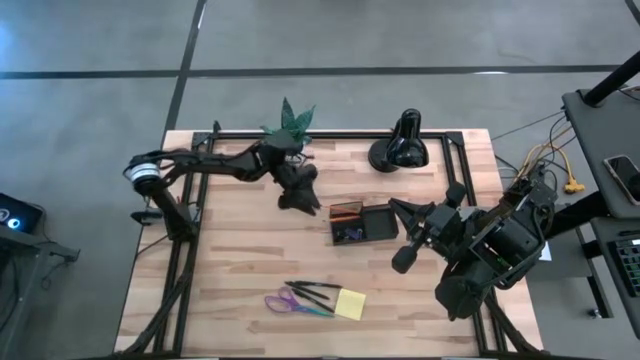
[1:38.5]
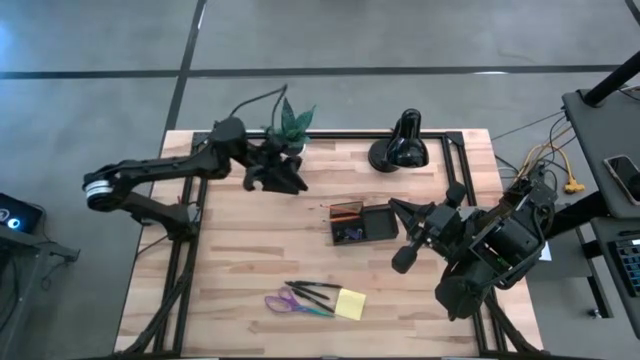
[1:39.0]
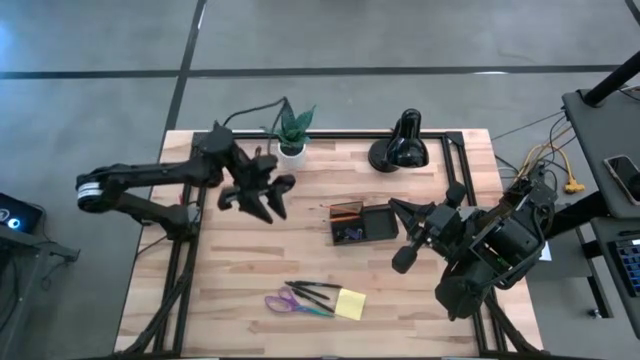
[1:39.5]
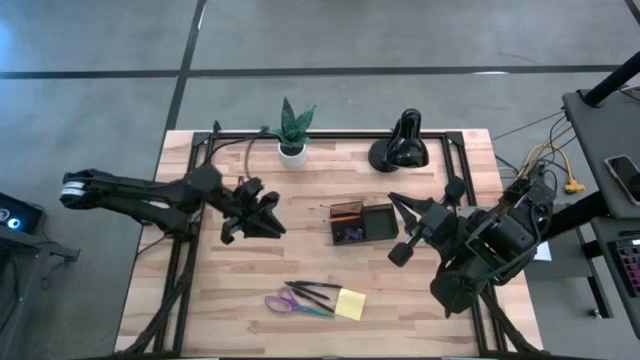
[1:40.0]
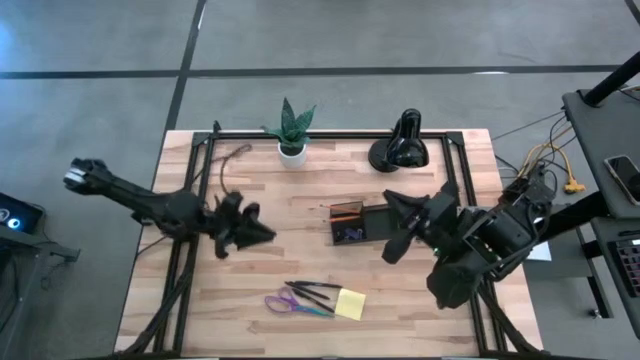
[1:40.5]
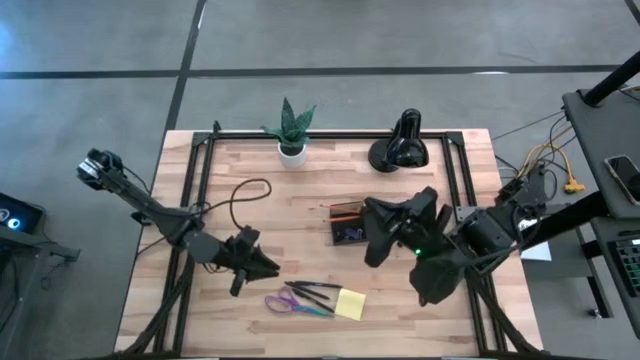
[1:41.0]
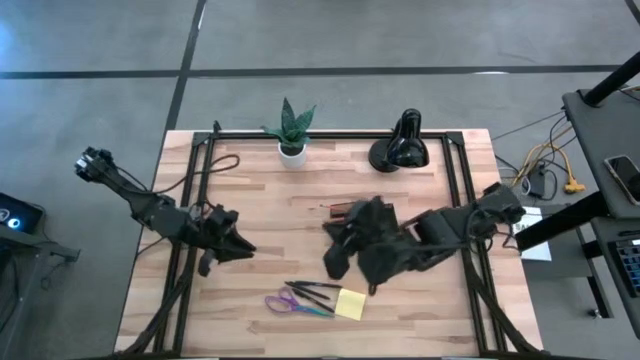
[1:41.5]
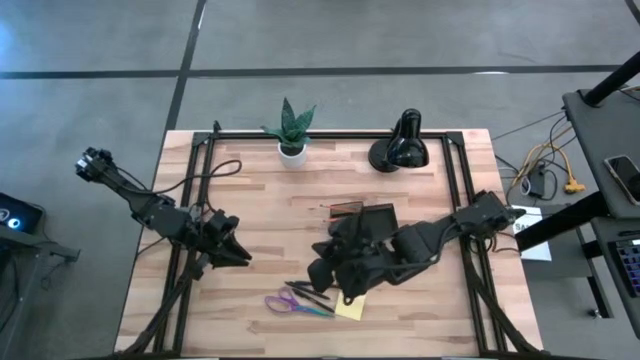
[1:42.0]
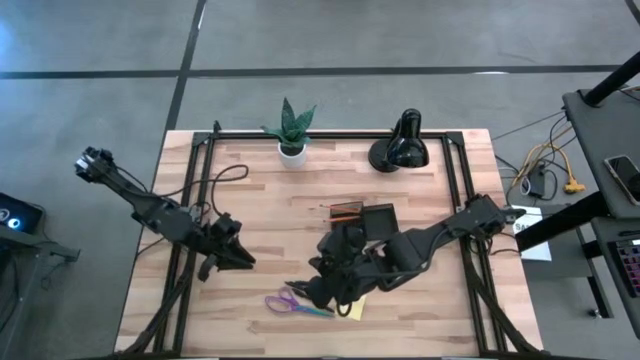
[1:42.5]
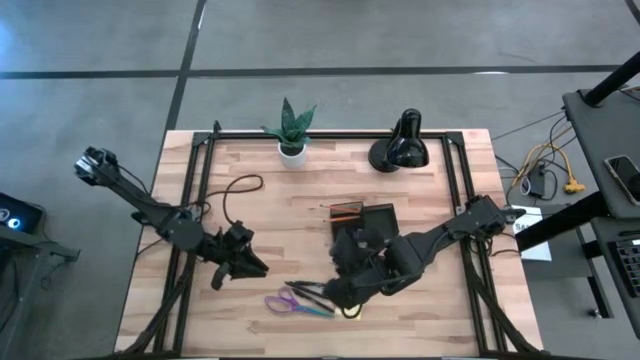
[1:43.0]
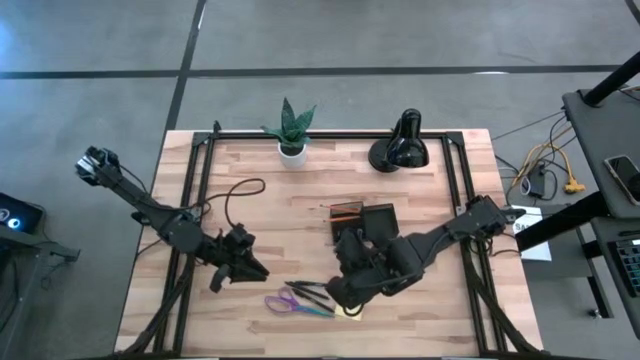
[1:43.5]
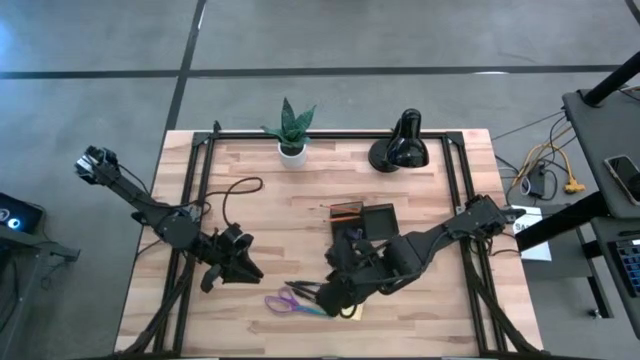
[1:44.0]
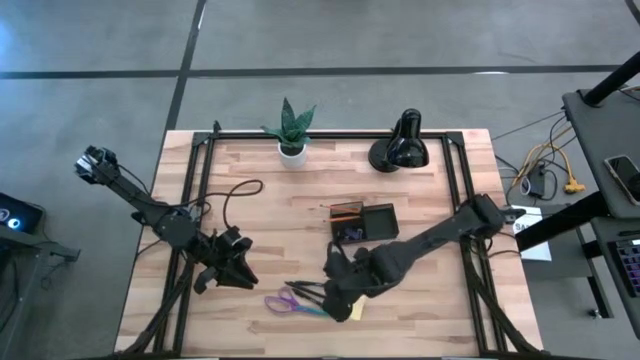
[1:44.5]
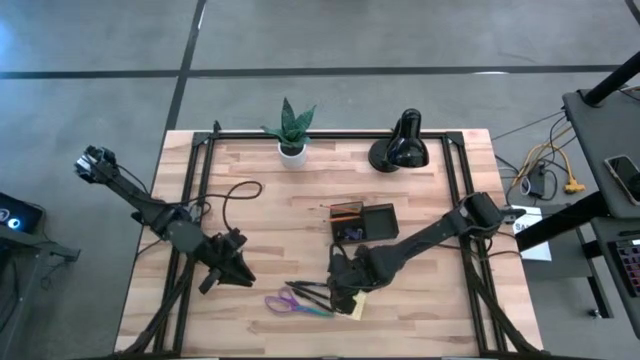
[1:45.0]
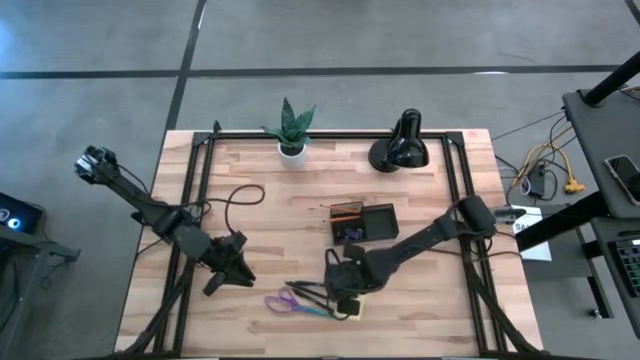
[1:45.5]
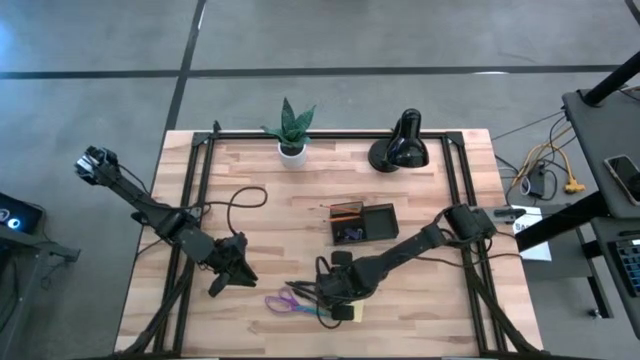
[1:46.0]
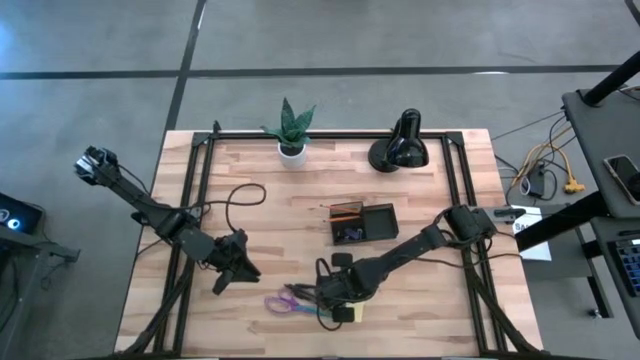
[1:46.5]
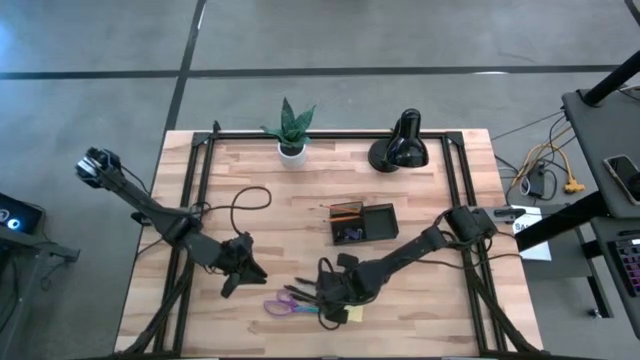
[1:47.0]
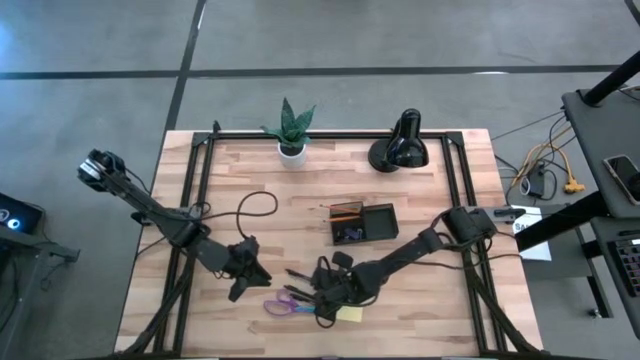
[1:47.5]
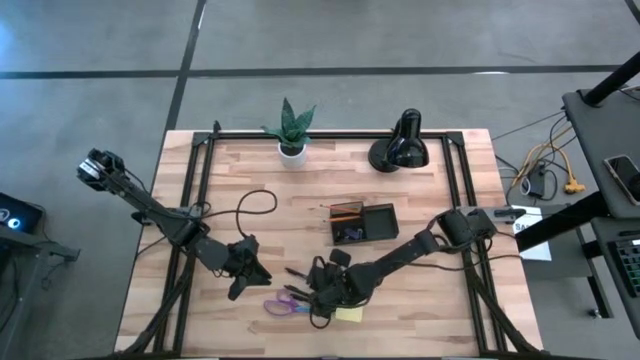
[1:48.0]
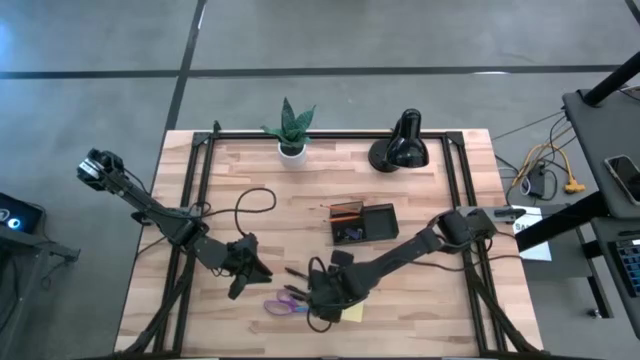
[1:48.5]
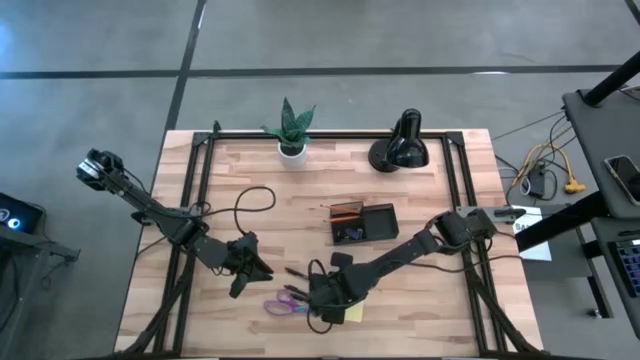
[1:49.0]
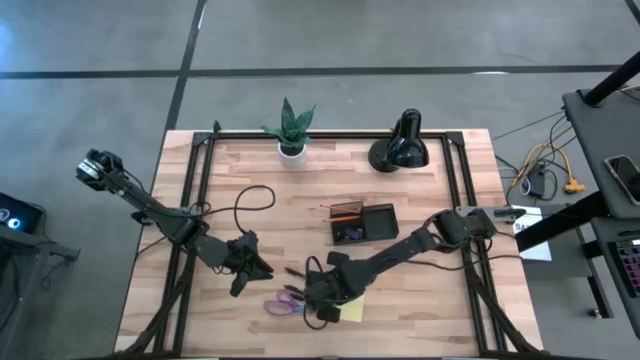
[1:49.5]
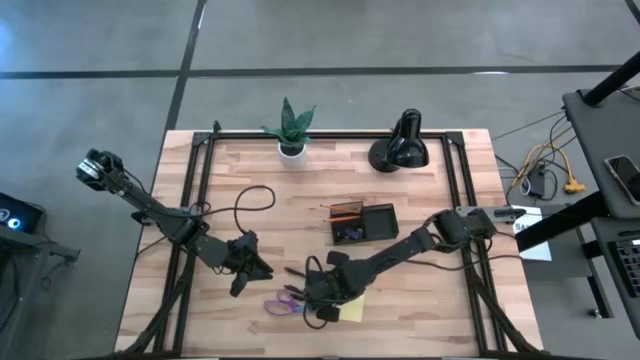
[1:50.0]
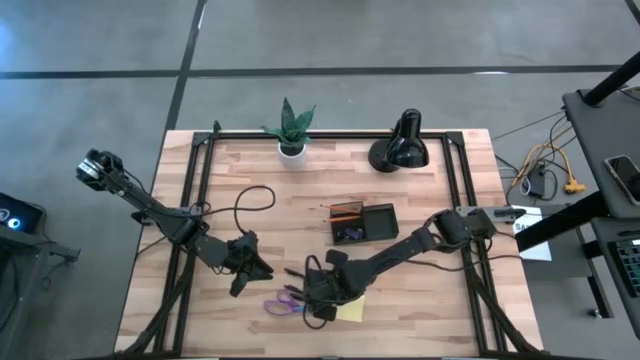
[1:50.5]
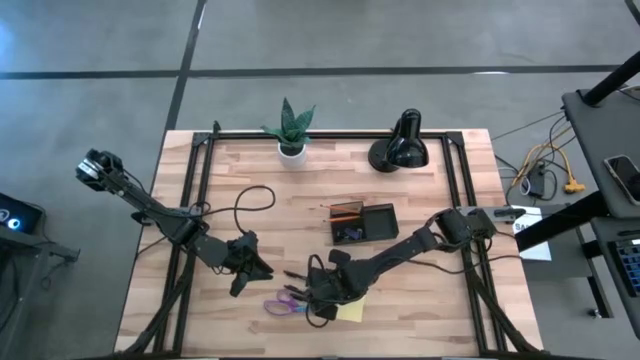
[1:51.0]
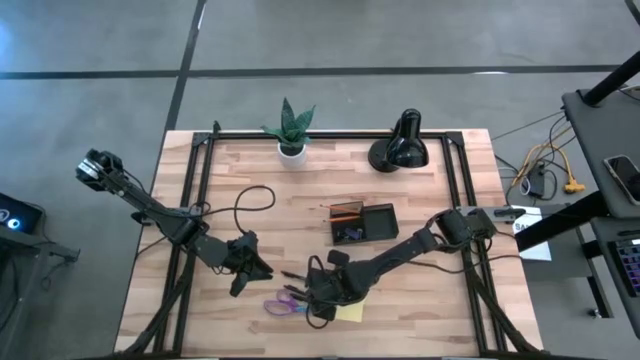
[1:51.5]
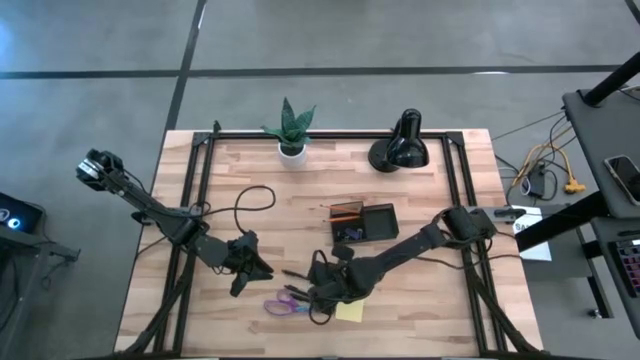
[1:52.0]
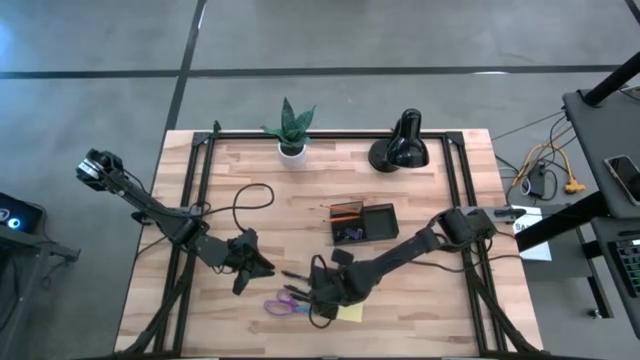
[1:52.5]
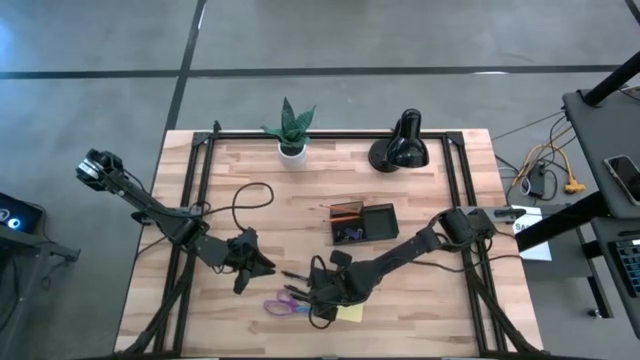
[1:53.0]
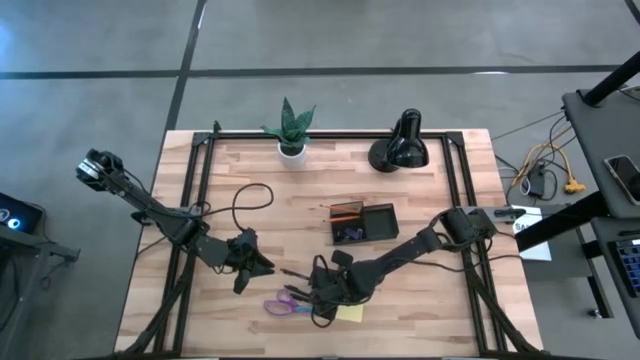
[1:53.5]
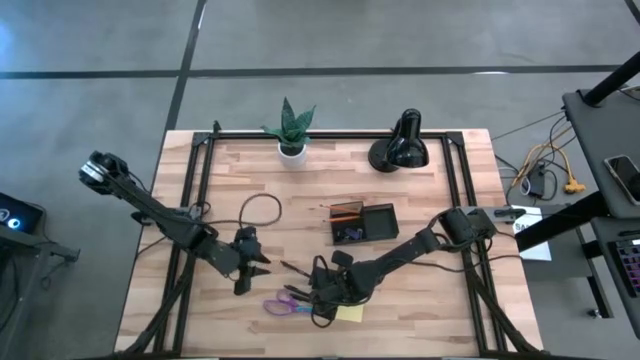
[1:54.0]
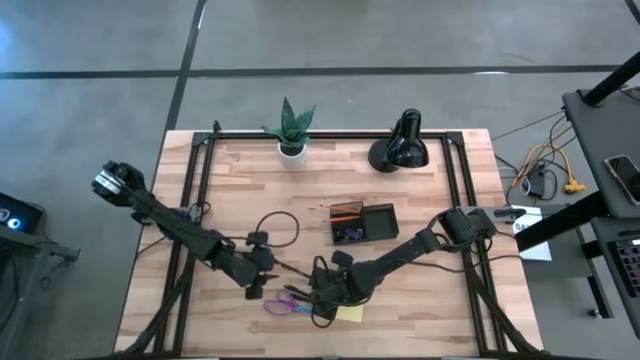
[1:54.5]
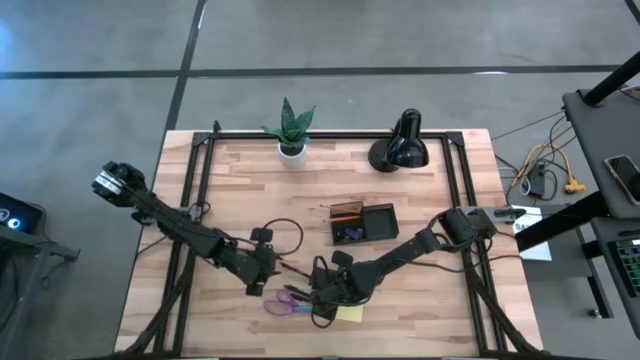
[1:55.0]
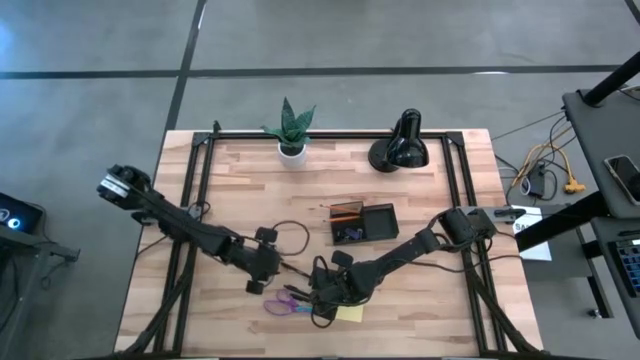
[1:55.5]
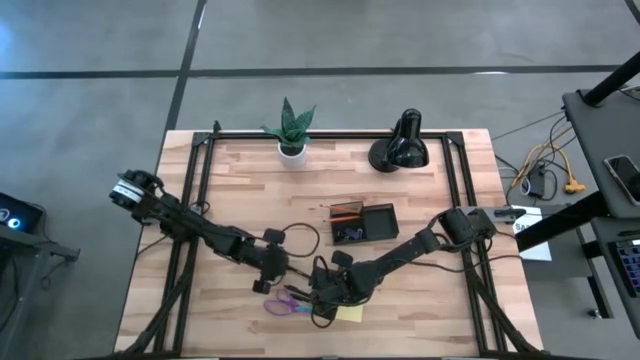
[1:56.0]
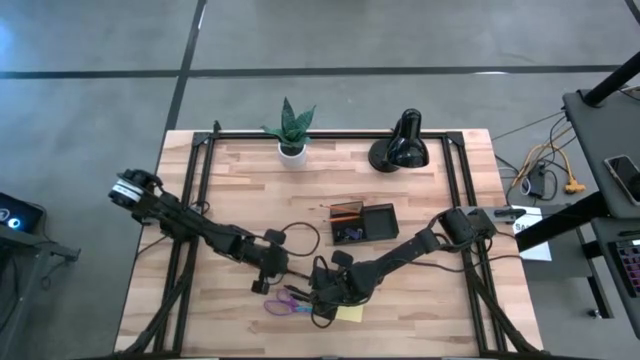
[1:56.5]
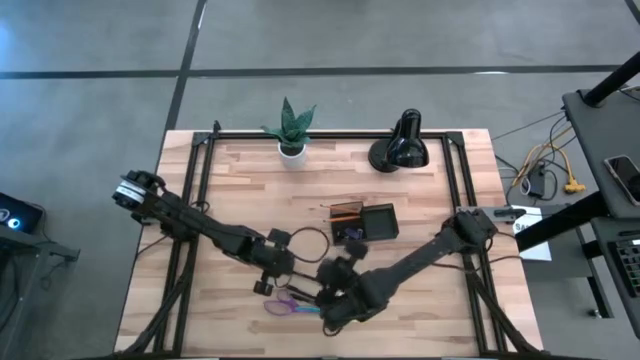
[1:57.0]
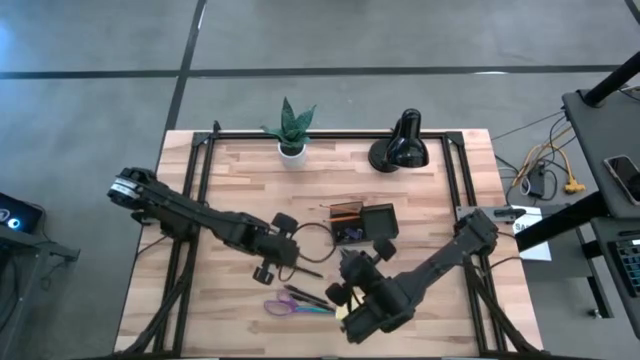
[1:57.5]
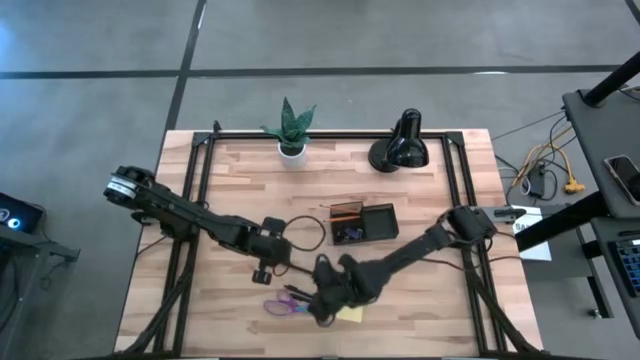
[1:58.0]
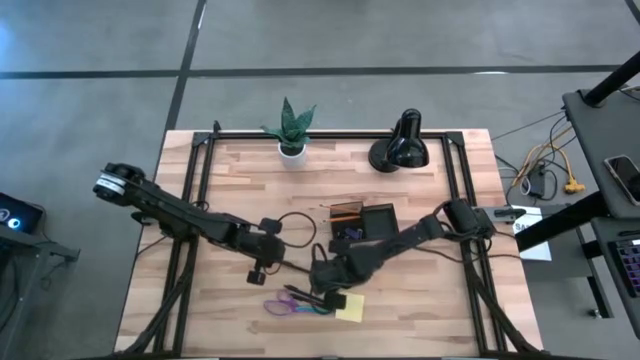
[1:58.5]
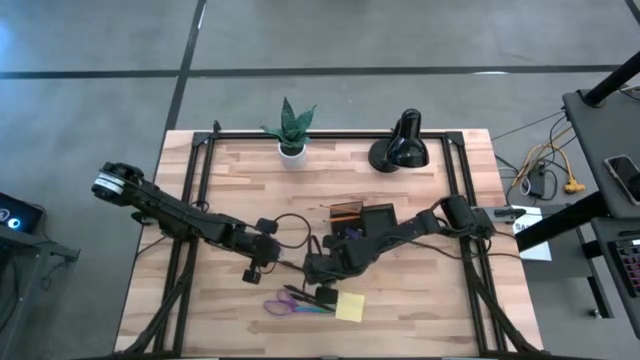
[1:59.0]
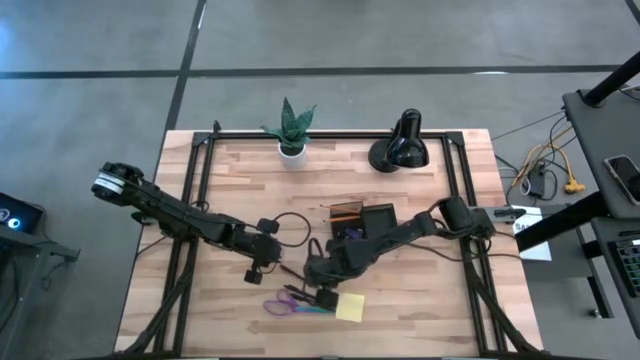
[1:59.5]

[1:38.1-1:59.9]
Task: Pick and place office supplies into organizer
Put the top black ballpen into the black desk organizer
